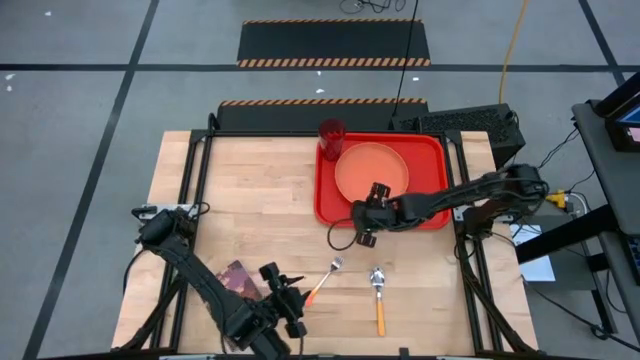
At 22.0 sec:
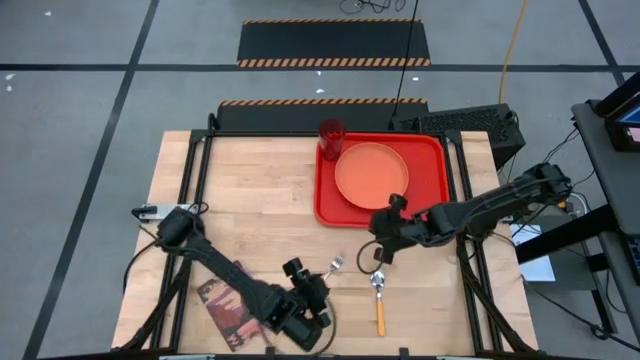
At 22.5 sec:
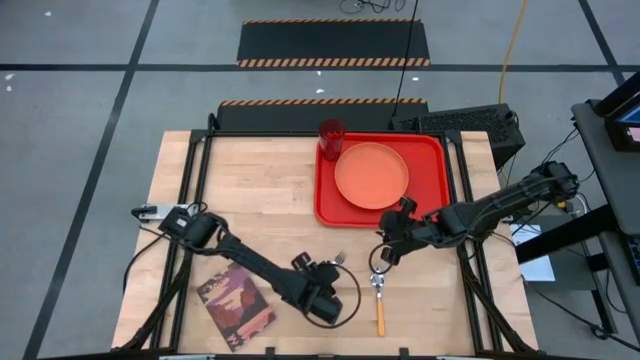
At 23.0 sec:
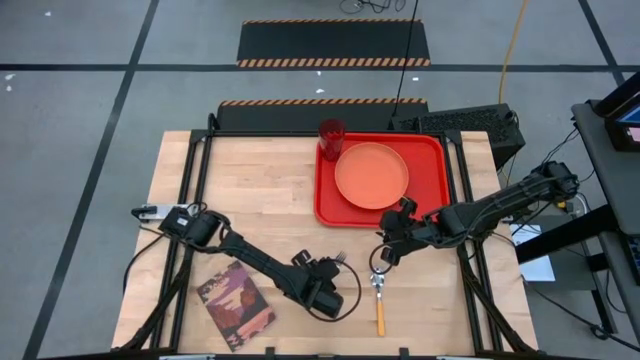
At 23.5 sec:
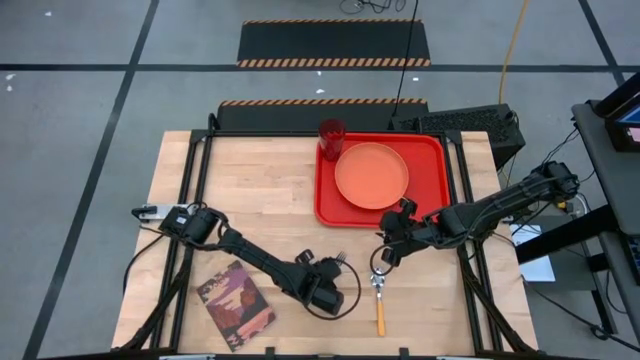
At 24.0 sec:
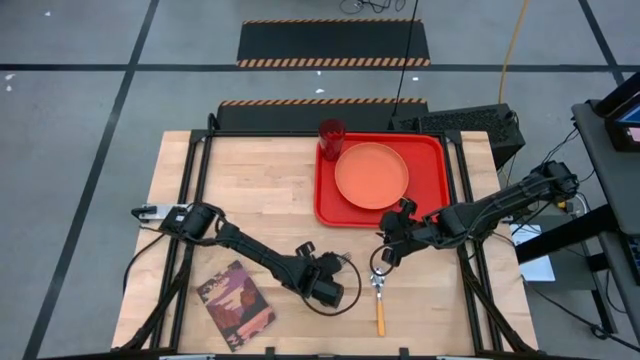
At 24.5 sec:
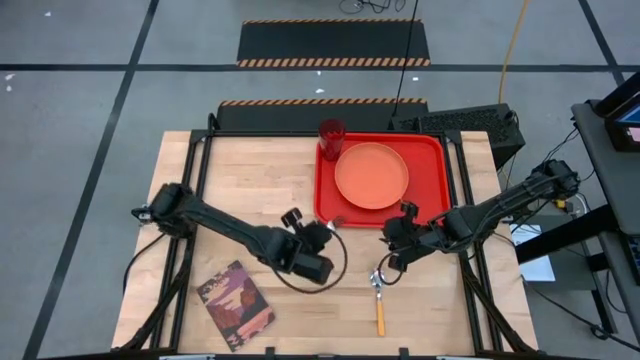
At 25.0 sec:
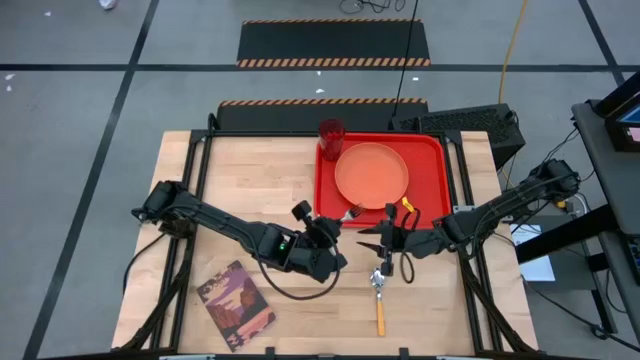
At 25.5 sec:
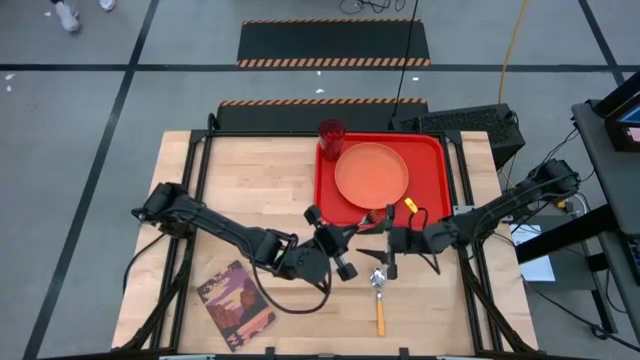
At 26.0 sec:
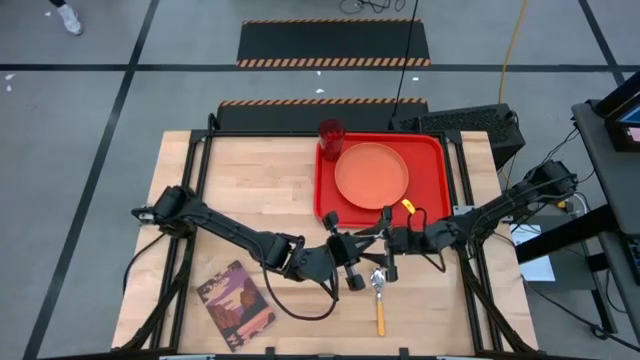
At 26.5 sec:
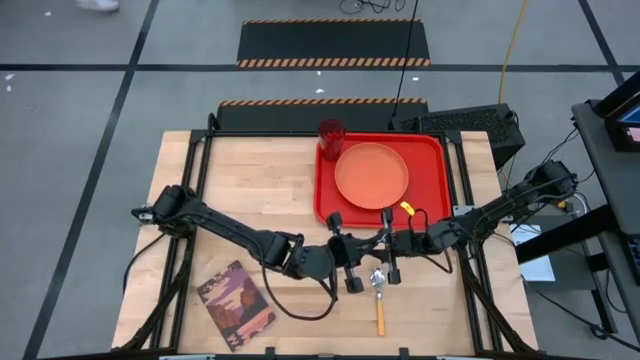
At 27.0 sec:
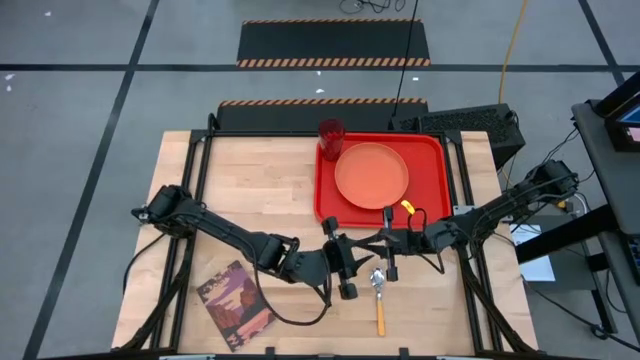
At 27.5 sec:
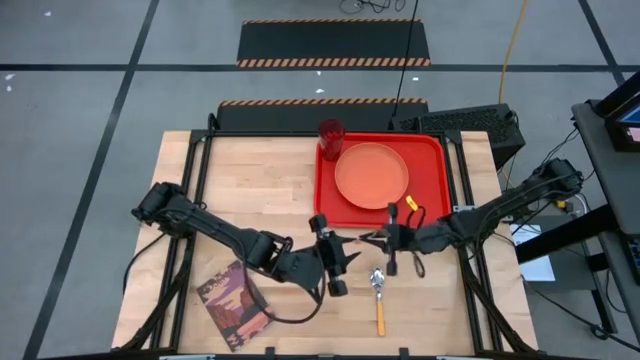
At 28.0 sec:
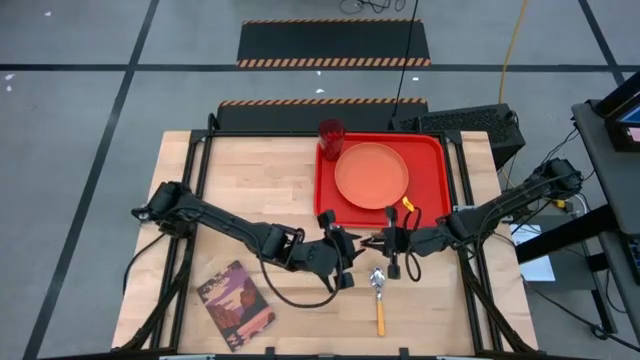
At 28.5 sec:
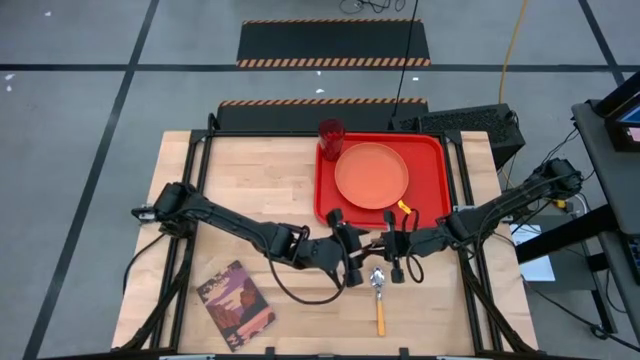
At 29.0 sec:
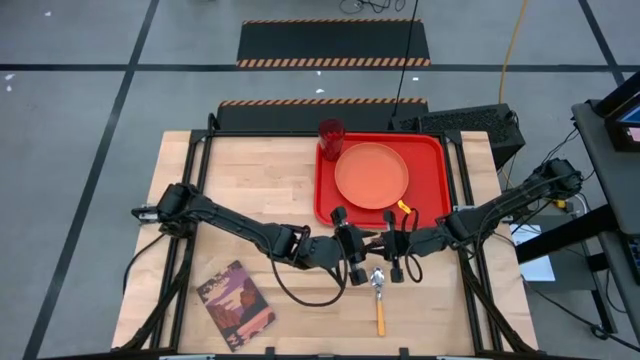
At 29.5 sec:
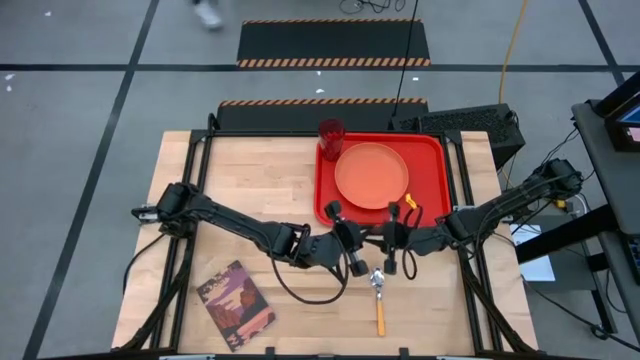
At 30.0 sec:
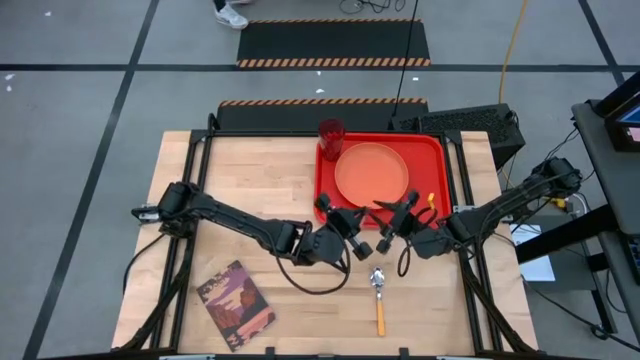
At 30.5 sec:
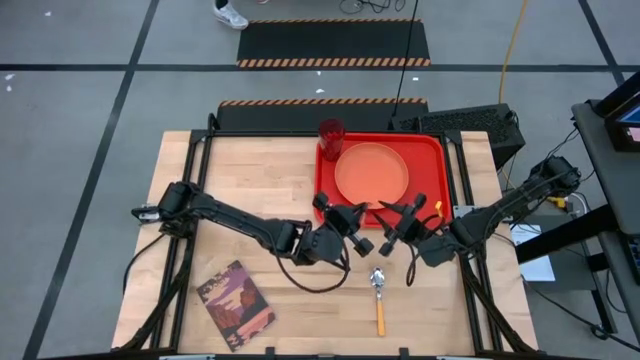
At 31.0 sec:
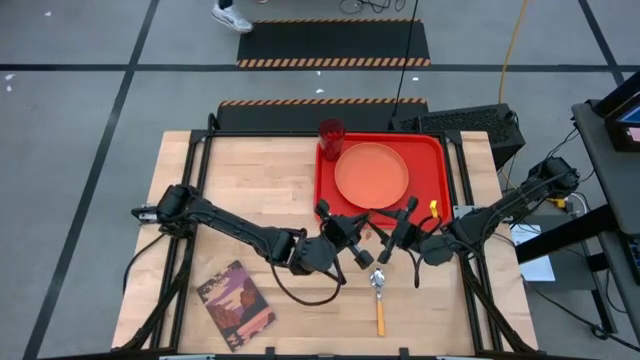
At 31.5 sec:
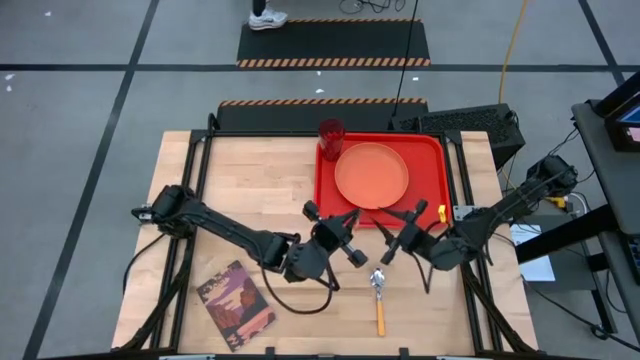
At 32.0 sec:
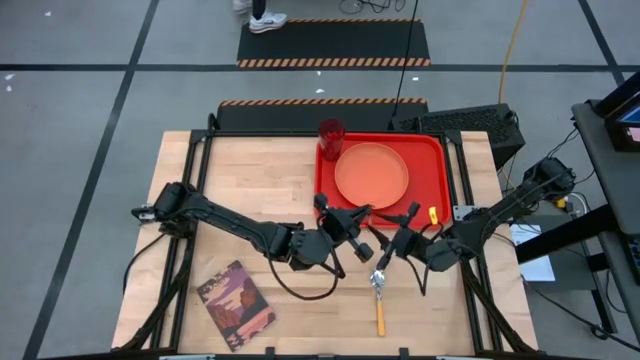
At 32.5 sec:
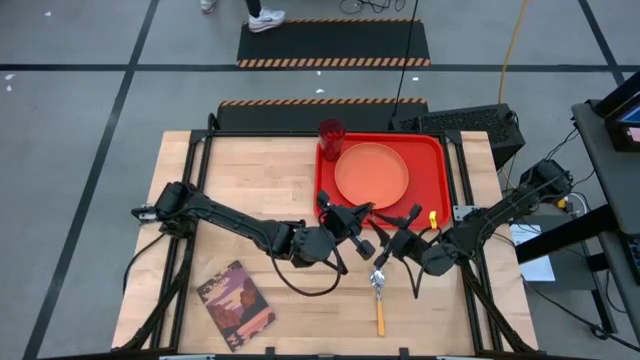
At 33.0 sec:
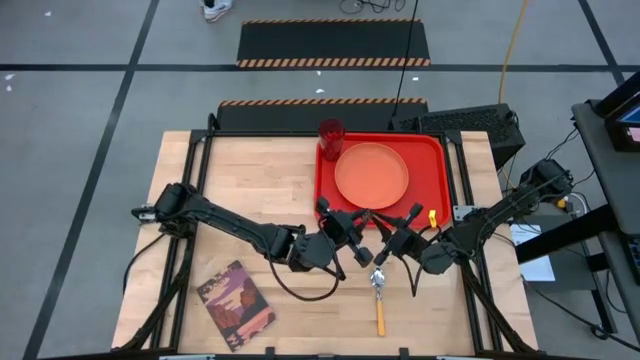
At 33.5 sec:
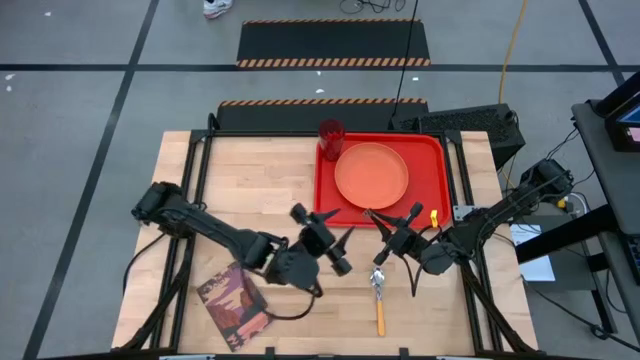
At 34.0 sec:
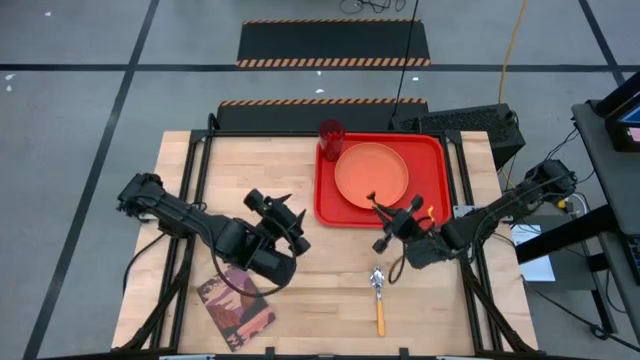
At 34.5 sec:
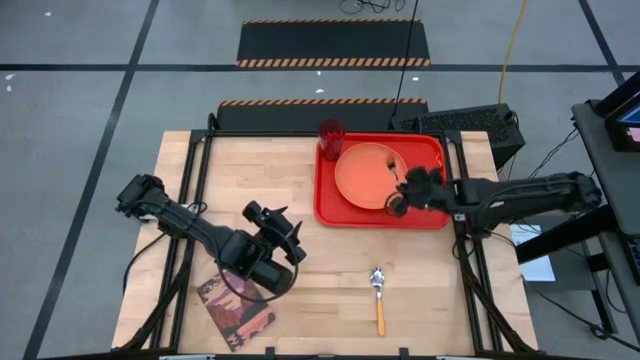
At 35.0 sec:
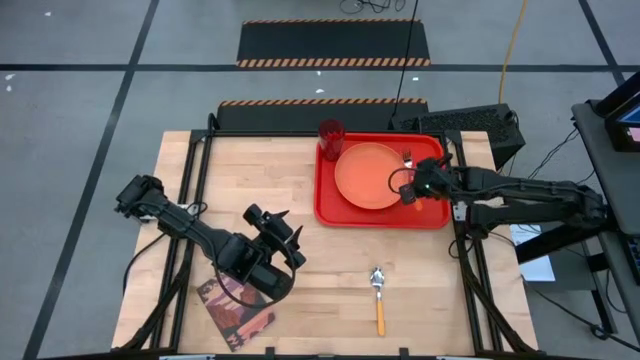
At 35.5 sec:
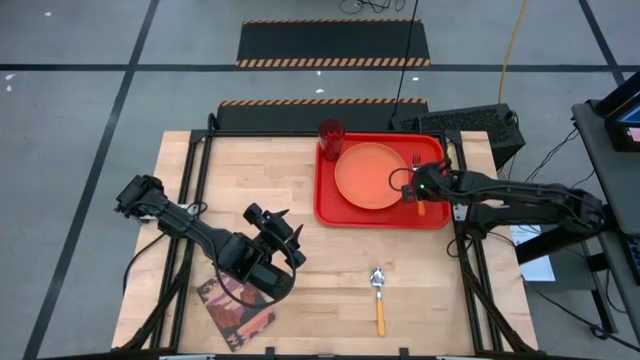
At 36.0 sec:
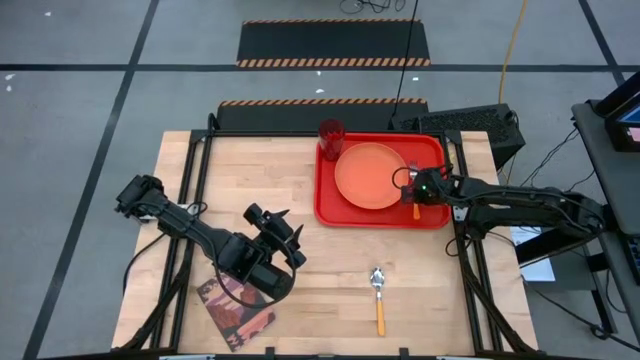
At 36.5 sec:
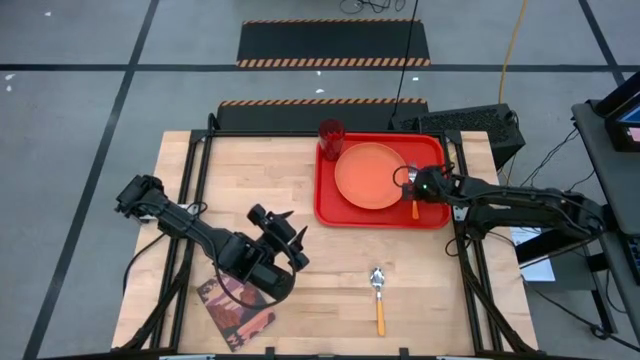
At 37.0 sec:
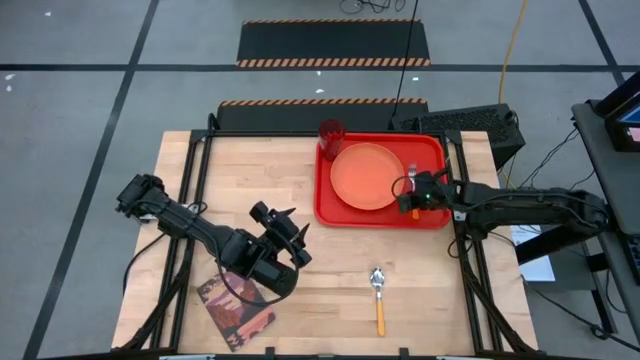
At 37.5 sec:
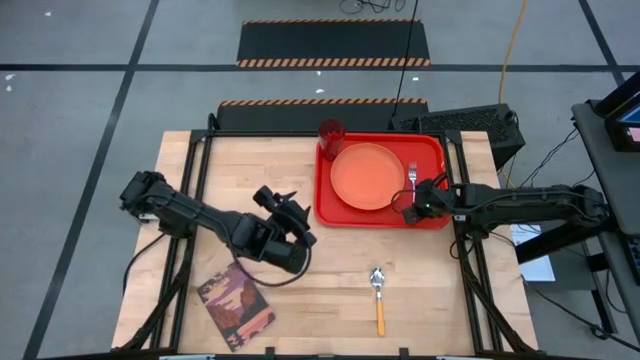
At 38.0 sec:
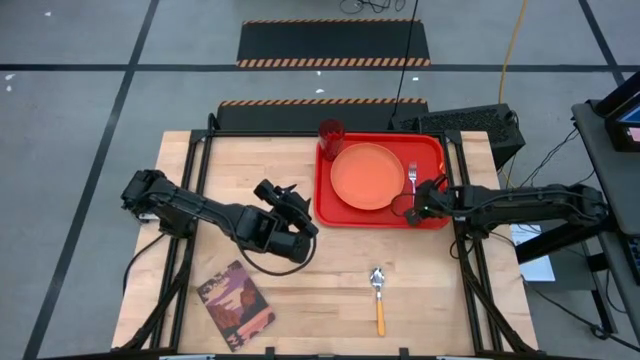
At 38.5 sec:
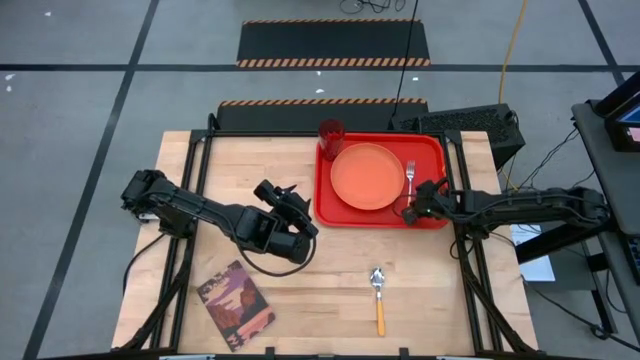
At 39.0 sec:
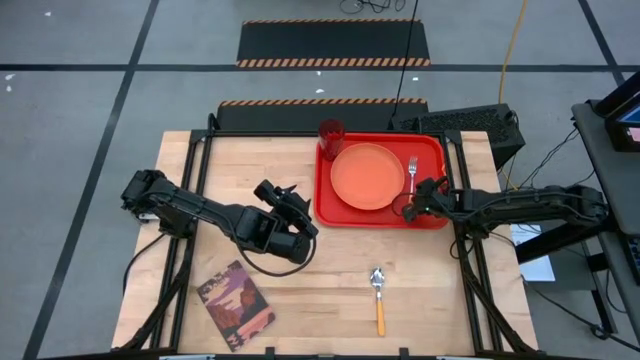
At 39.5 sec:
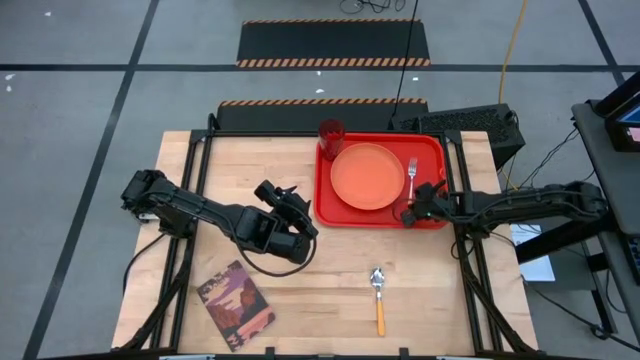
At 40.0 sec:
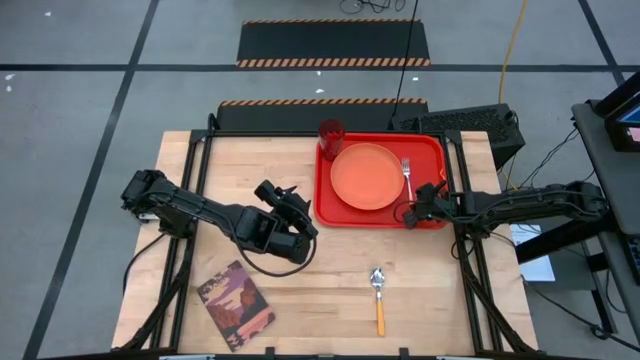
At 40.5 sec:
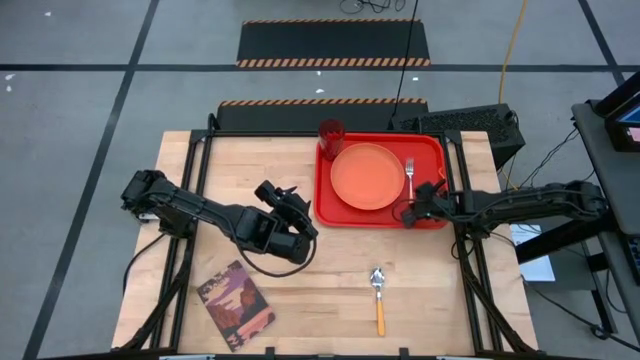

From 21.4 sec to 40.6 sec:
Task: Pick and place plate/cup/fork/spoon on tray
Put the orange fork beside the orange plate on the red tray

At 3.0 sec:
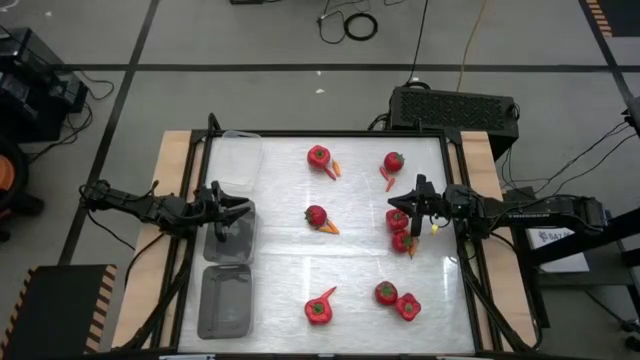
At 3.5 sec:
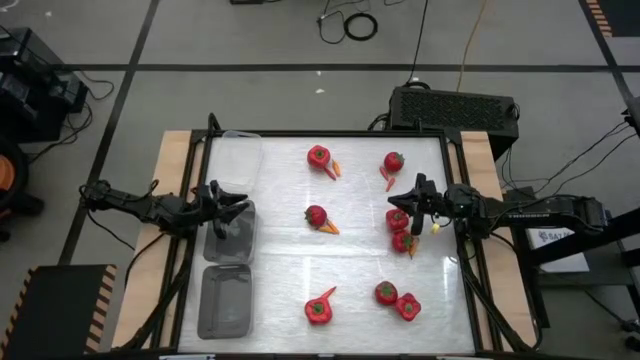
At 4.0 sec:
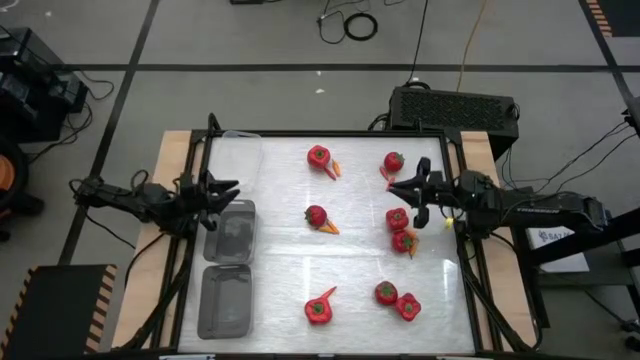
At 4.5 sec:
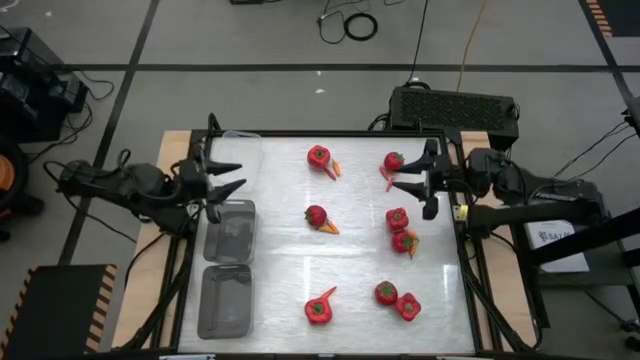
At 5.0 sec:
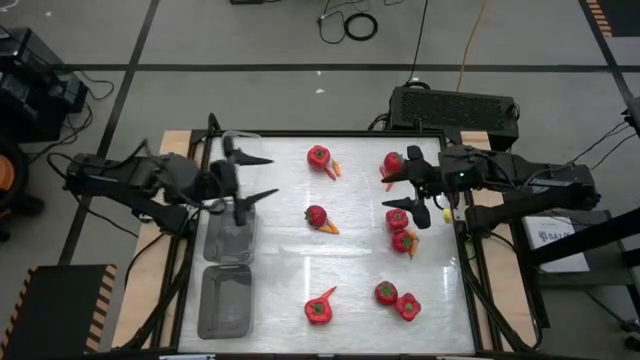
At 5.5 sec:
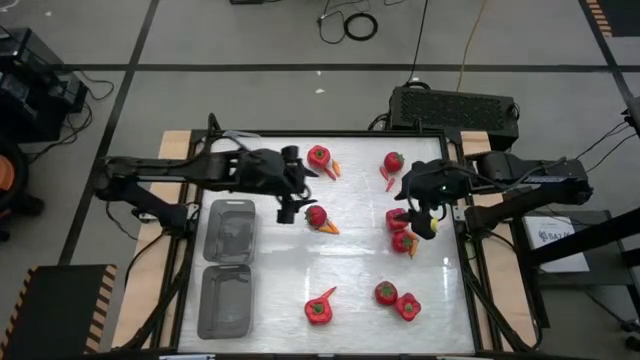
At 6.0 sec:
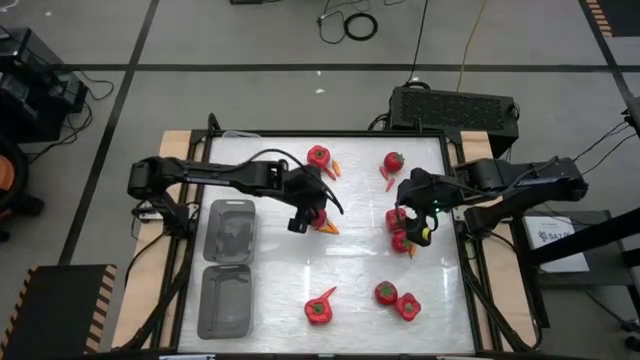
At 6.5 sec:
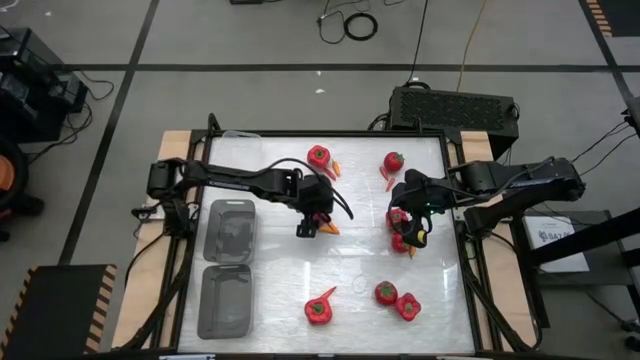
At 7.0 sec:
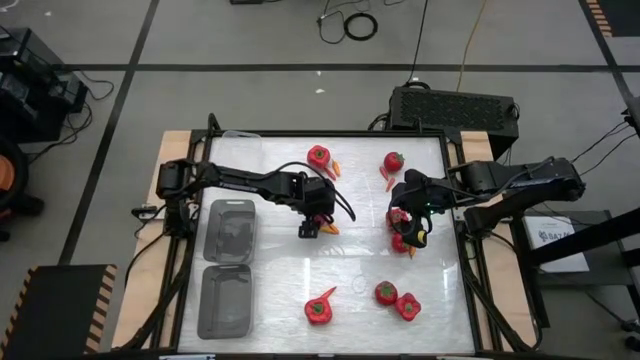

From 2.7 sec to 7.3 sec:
Task: Sort produce into baskets
Put the red tomato into the transparent bin
